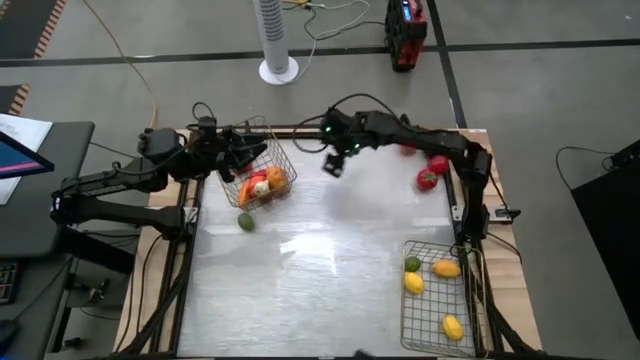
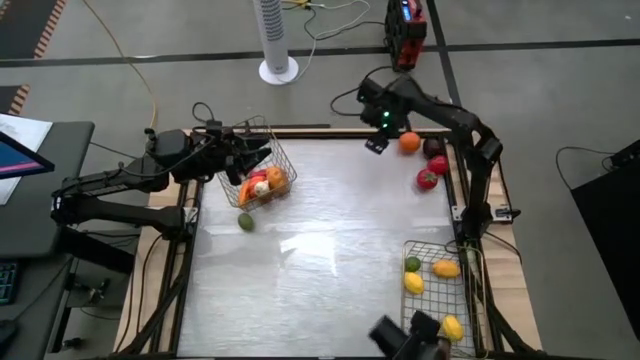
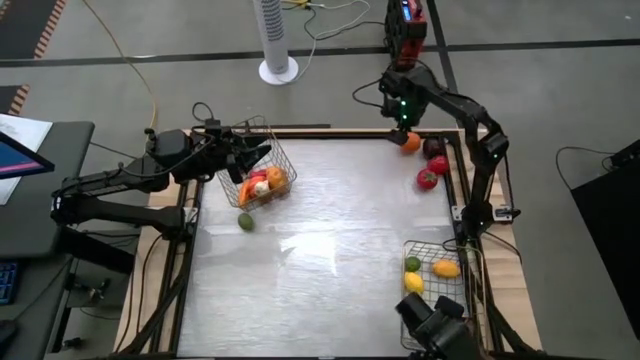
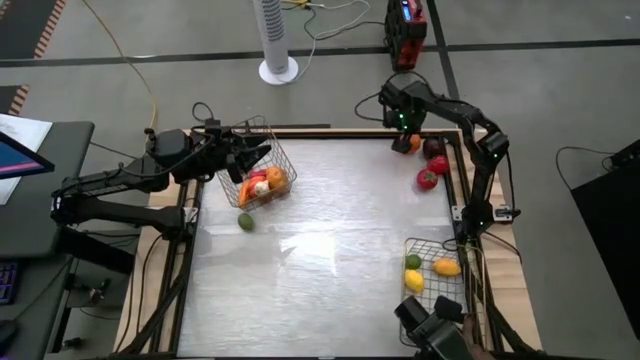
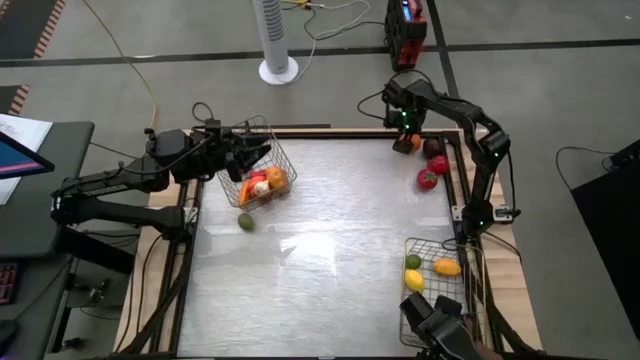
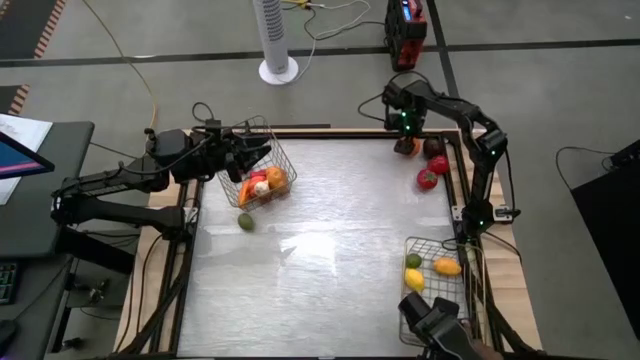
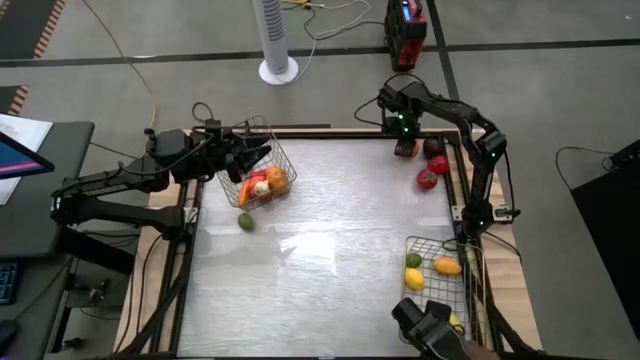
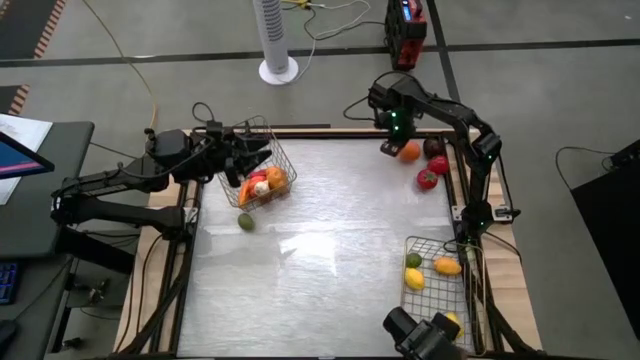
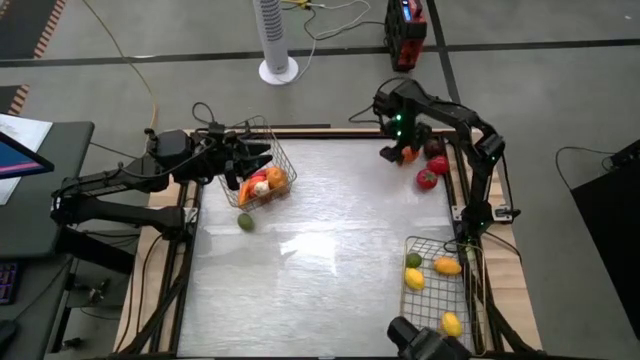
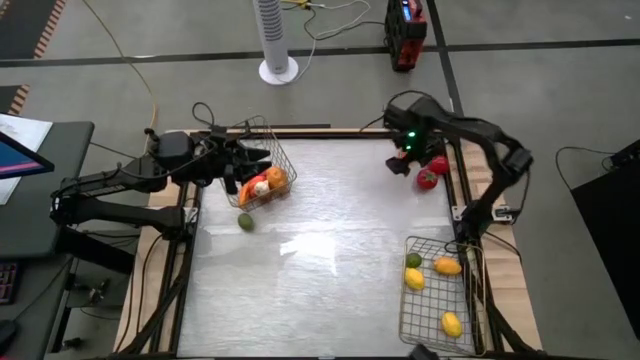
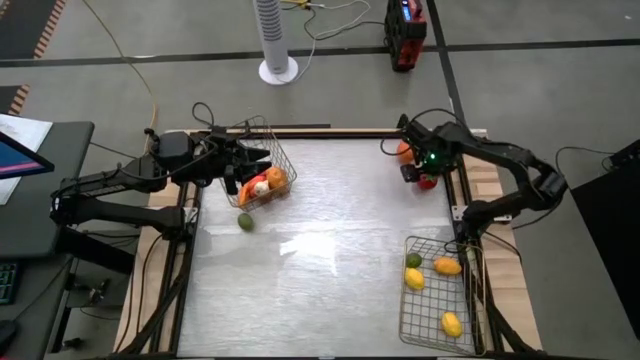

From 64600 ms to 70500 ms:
Task: Sort produce into baskets
Put the orange into the bottom wire basket

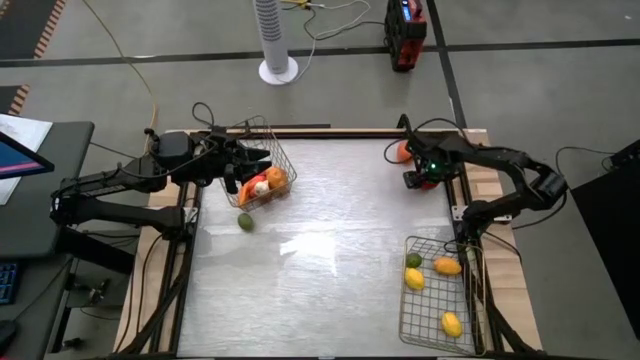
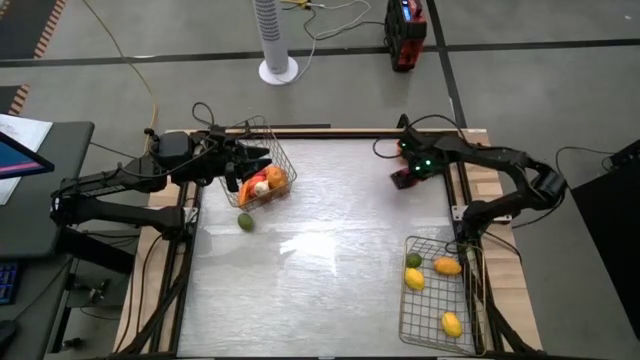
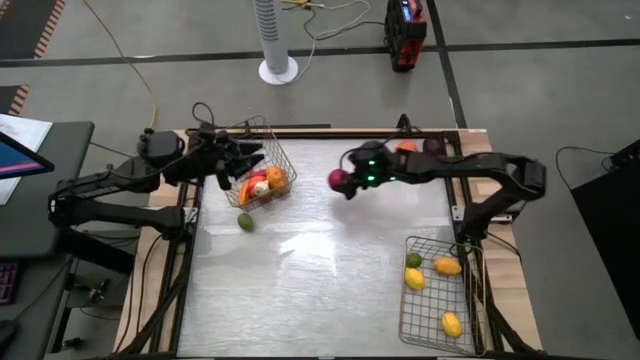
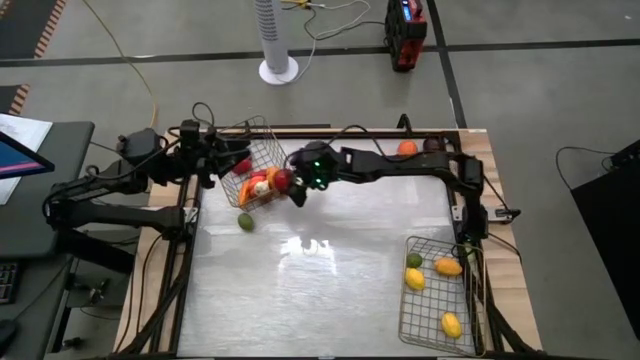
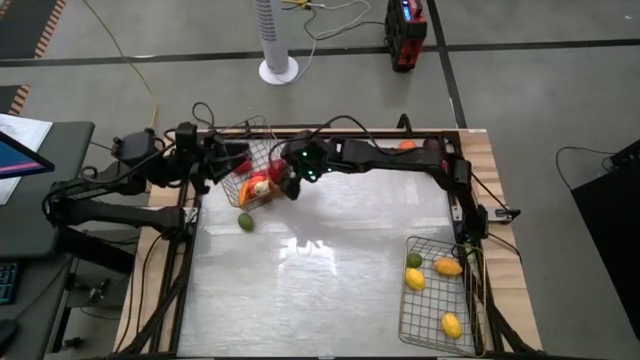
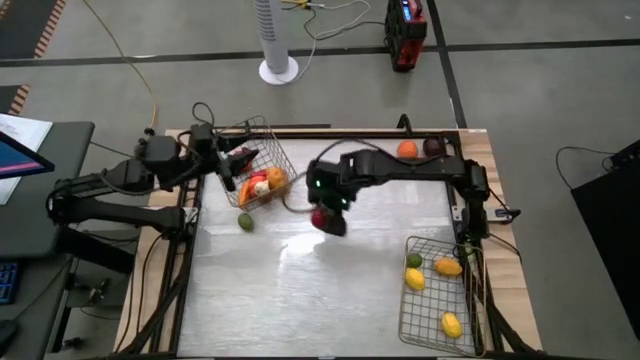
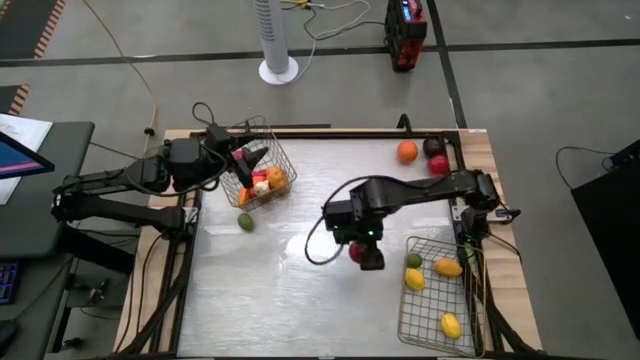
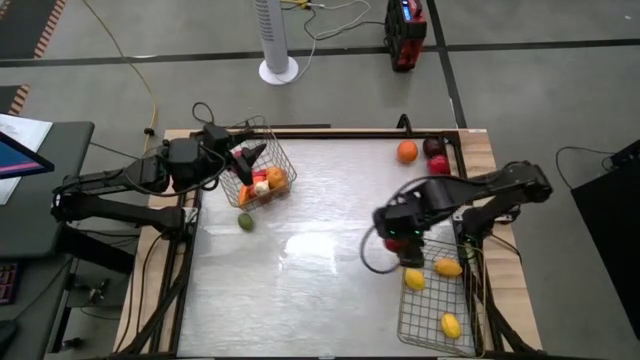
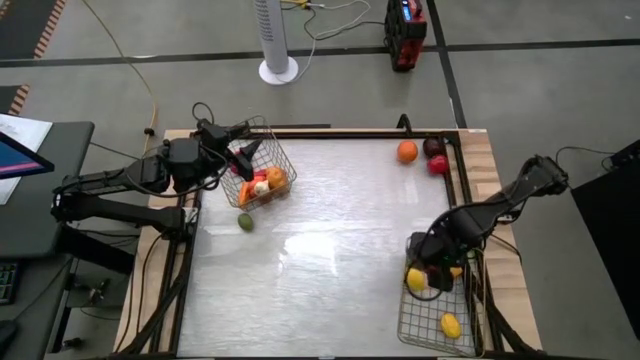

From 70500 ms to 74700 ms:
Put the left tomato into the bottom wire basket

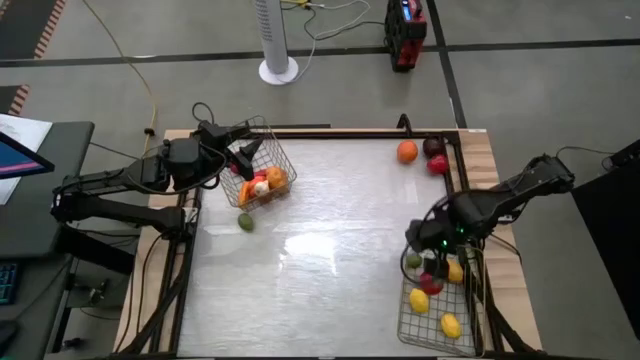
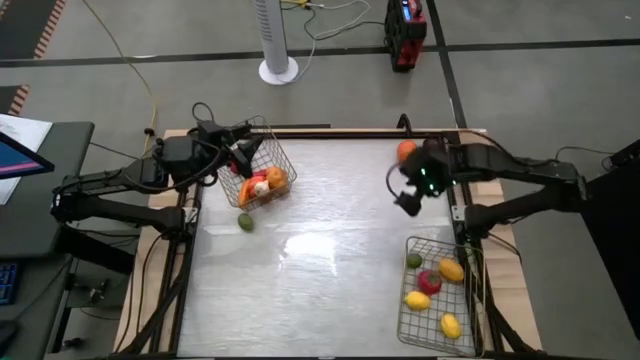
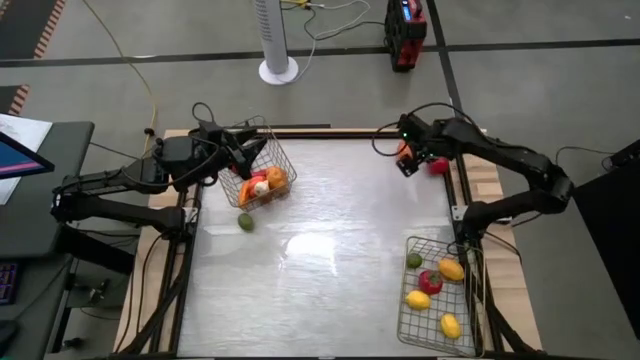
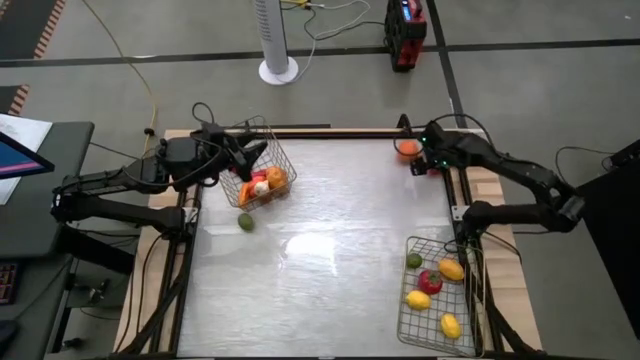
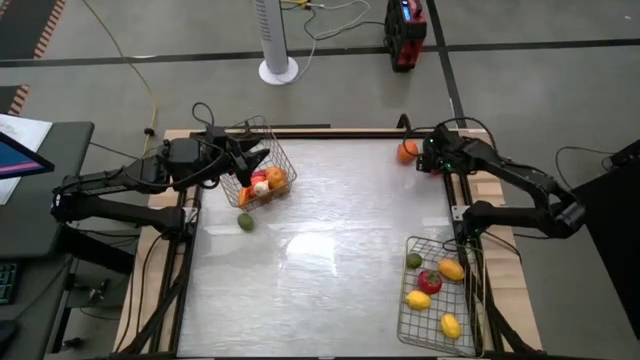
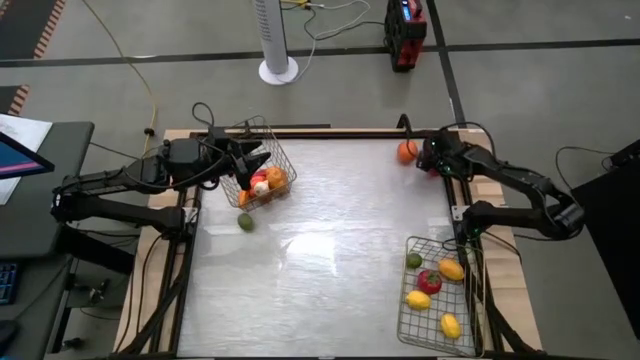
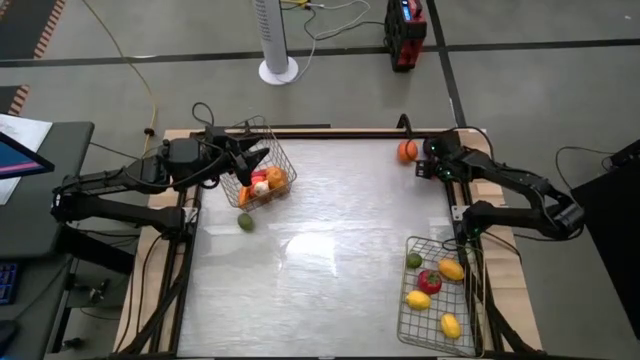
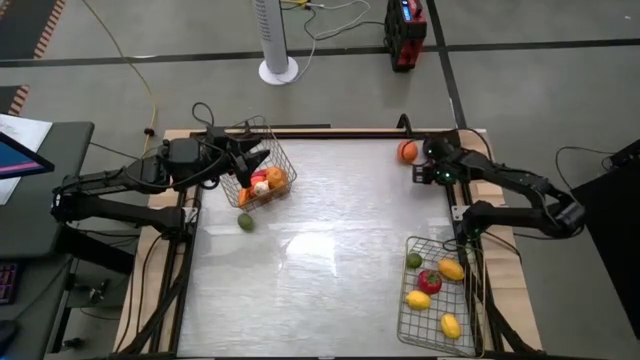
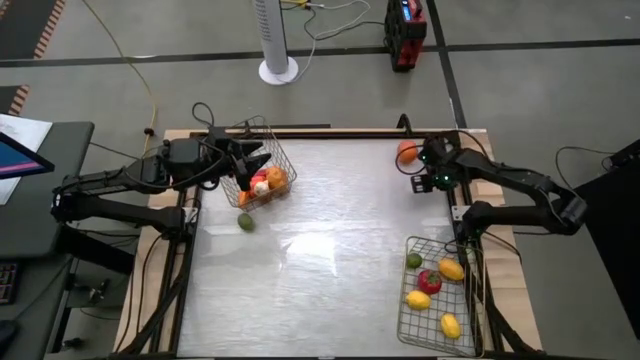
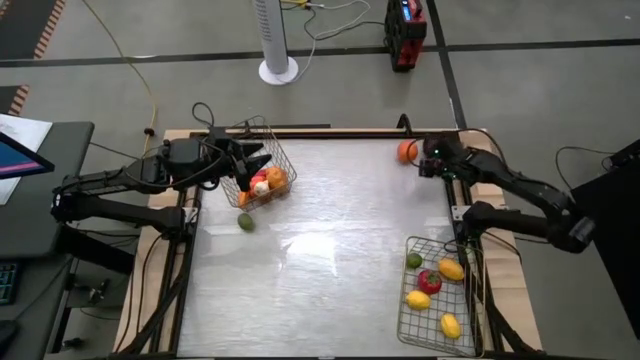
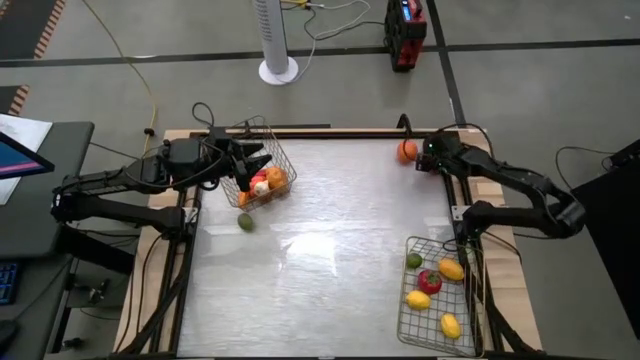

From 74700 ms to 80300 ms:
Put the tomato into the bottom wire basket

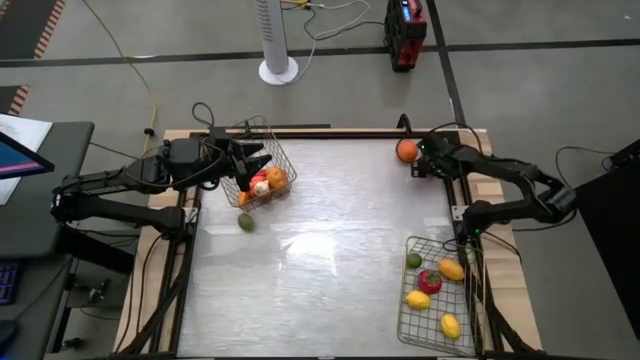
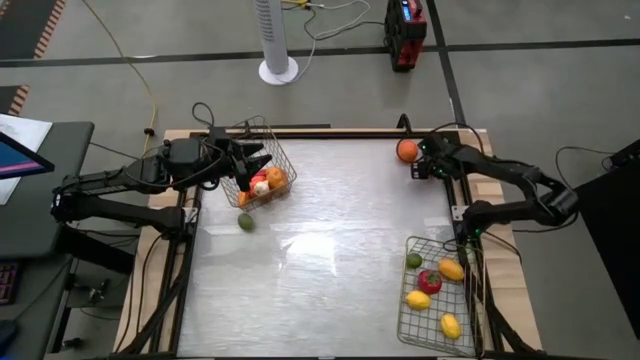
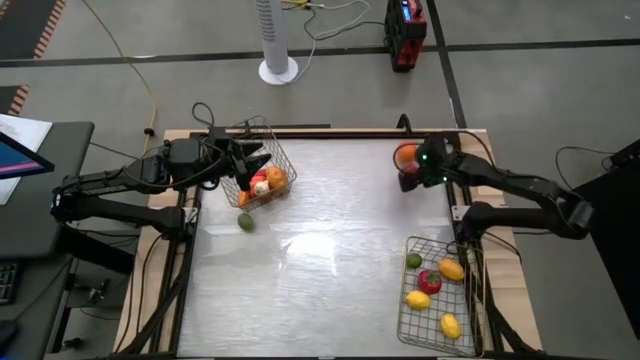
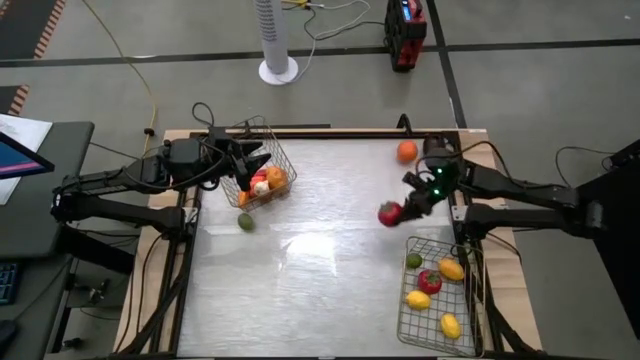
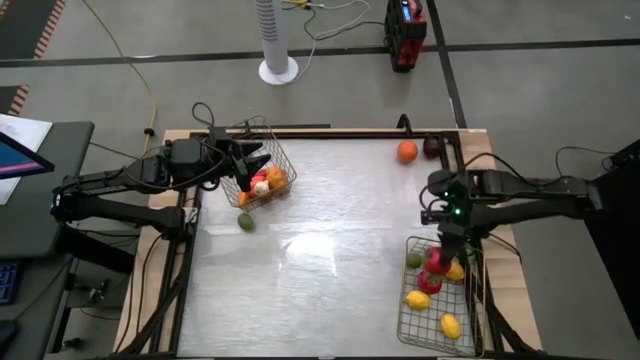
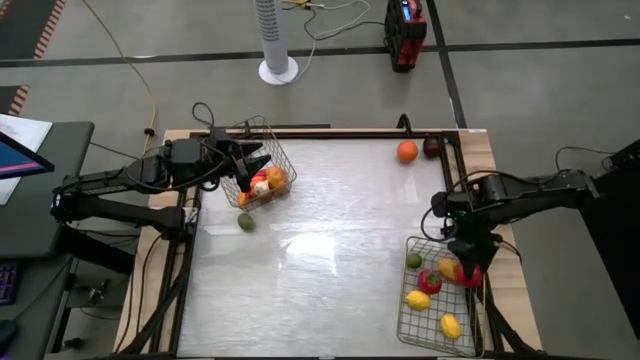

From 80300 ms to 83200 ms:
Put the tomato into the bottom wire basket

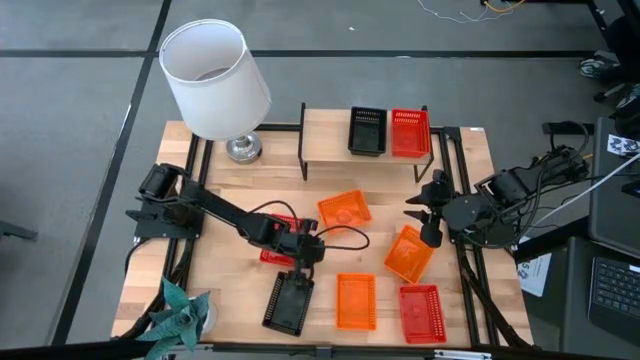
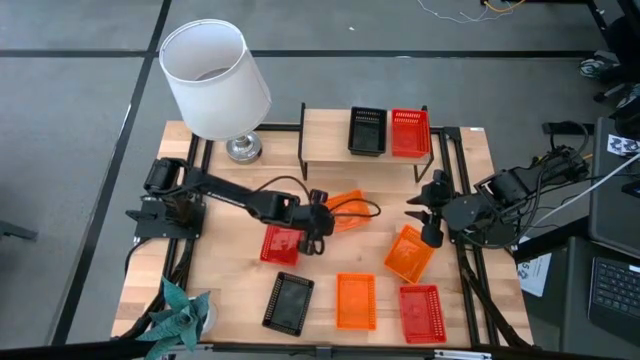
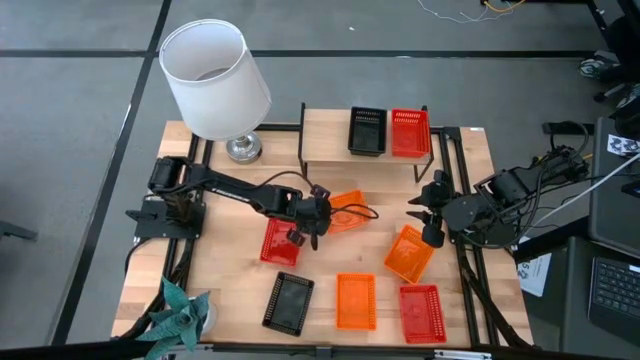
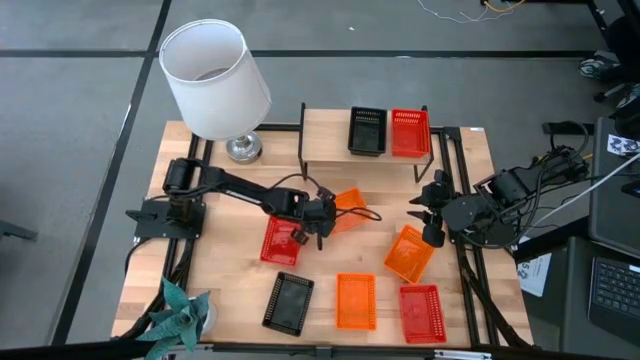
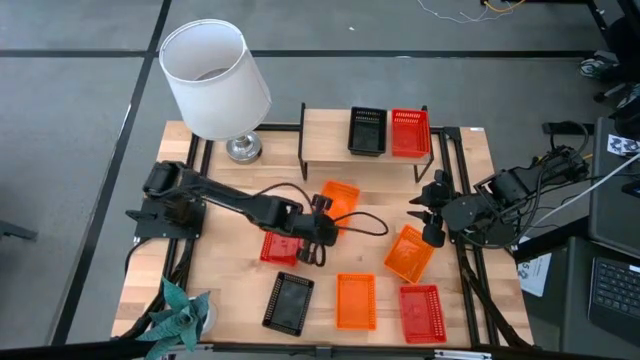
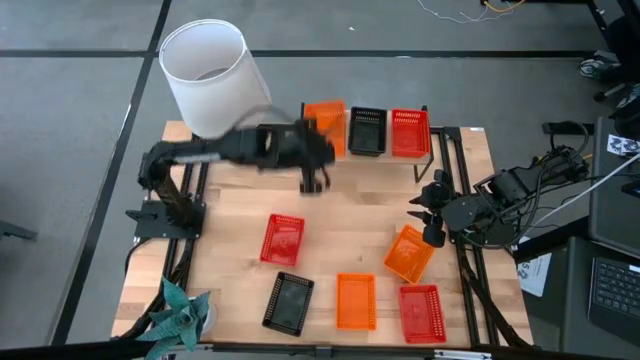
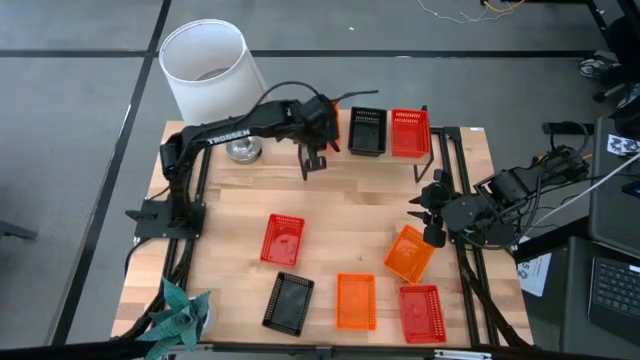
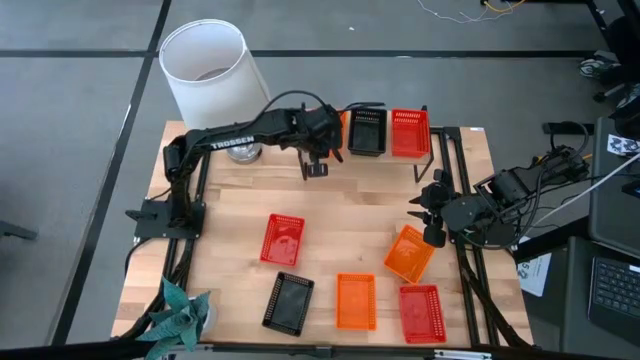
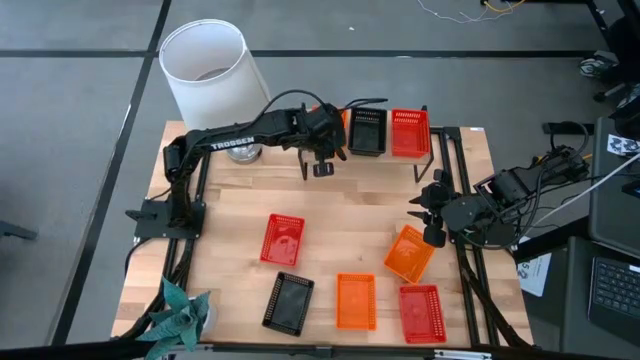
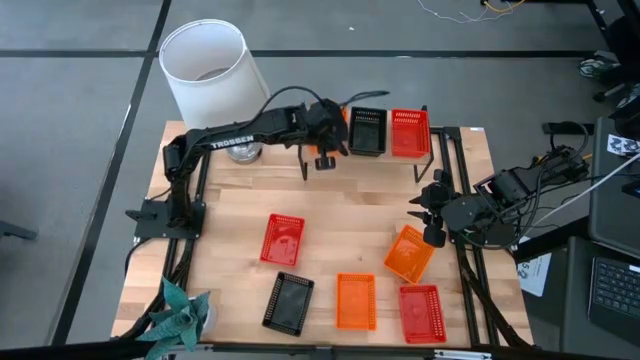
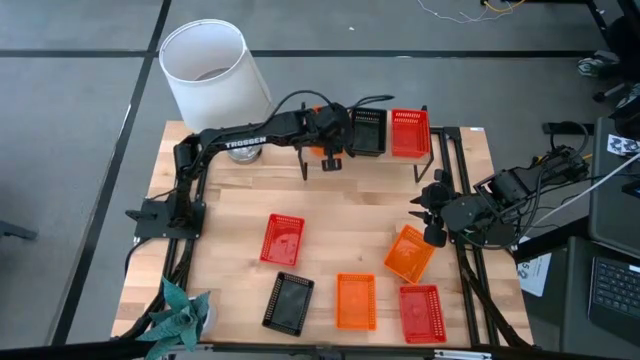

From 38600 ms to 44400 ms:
Task: Stack baskets on shelf by color
Put the top left orange bin on the shelf
